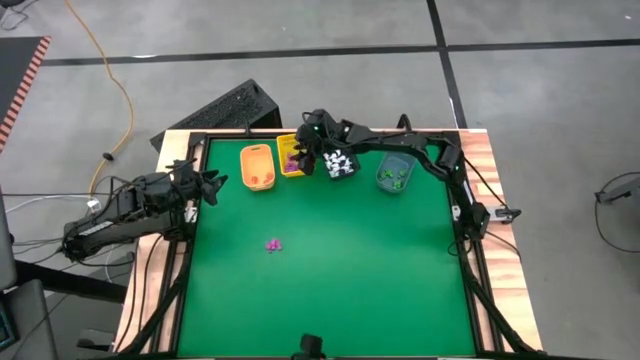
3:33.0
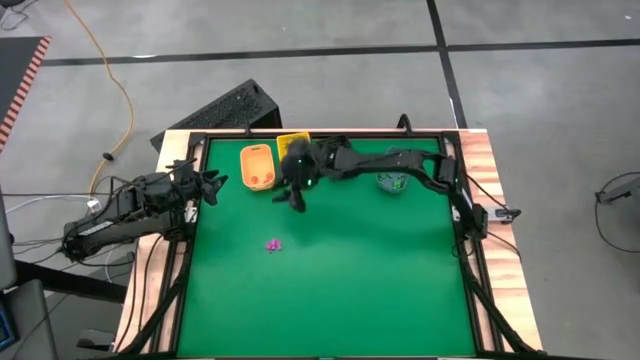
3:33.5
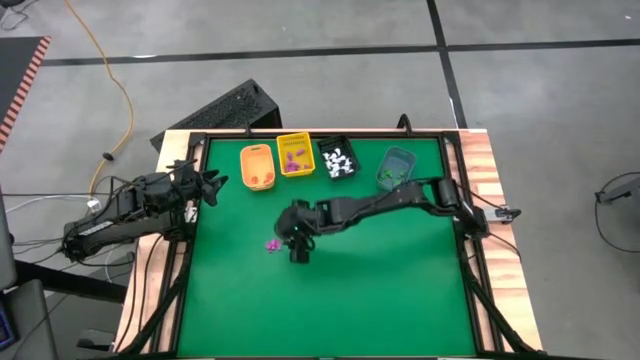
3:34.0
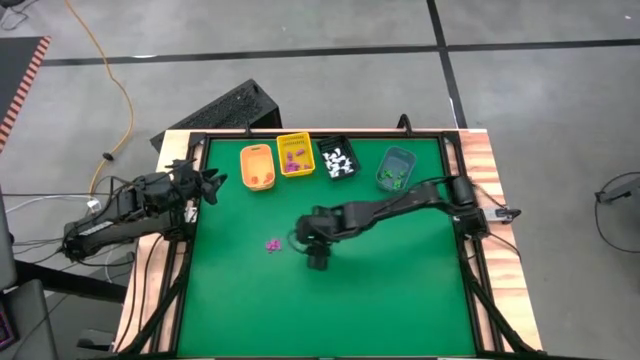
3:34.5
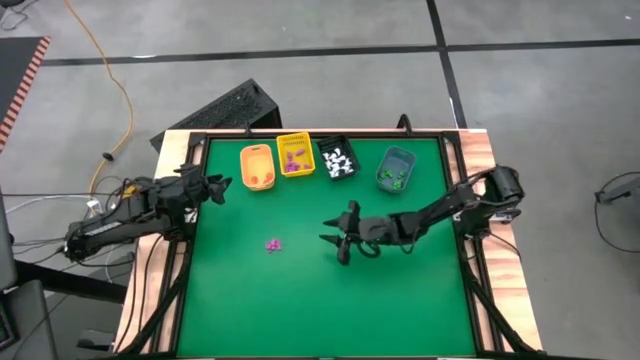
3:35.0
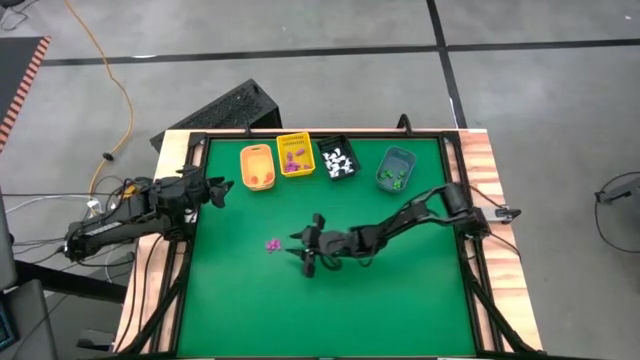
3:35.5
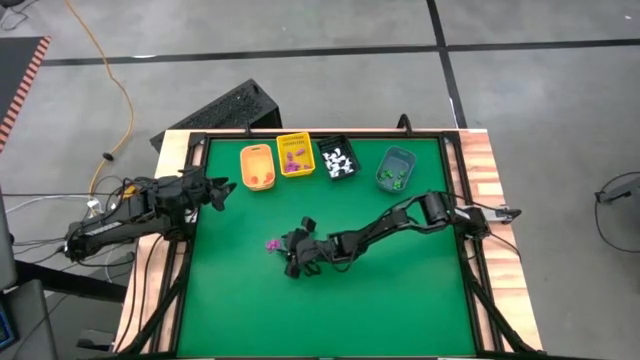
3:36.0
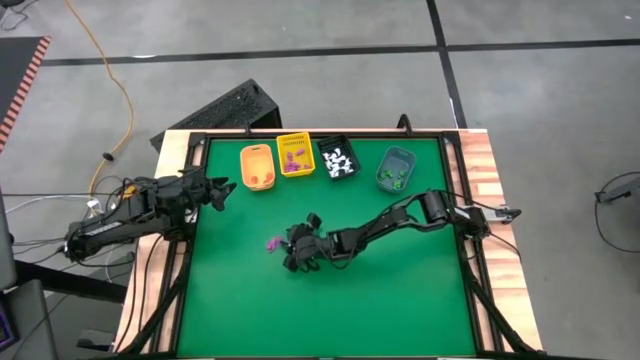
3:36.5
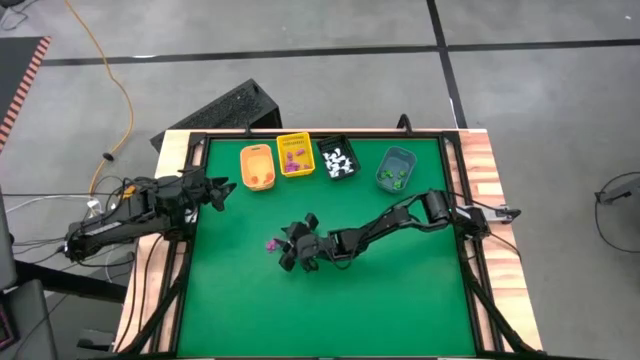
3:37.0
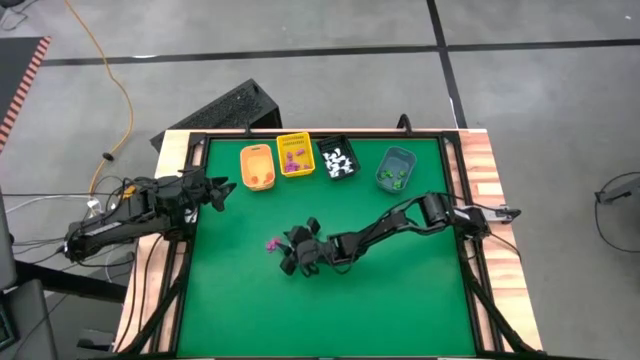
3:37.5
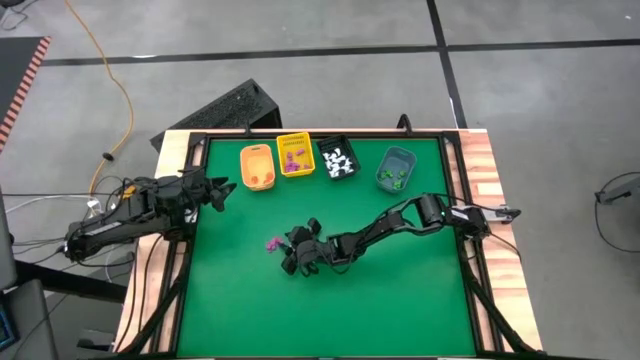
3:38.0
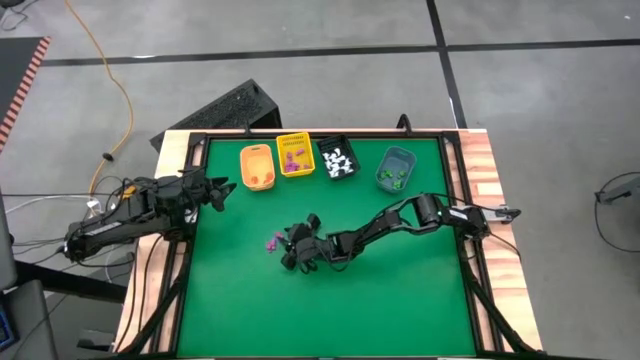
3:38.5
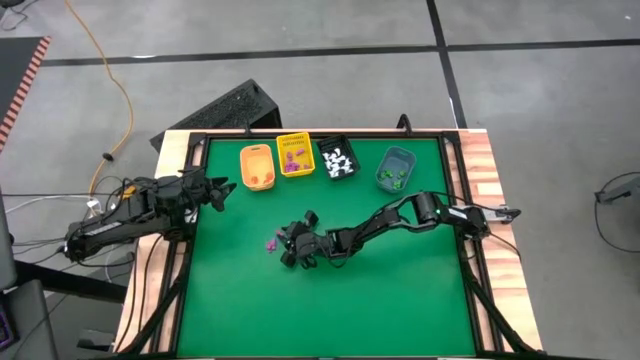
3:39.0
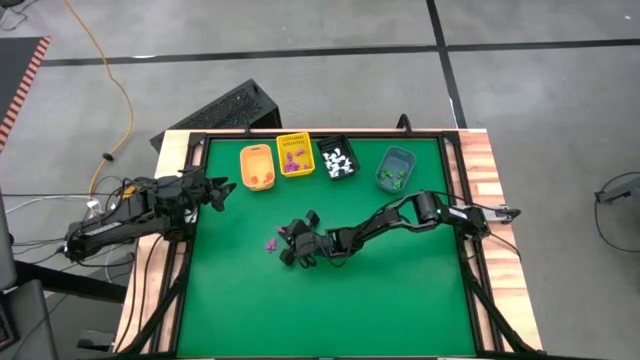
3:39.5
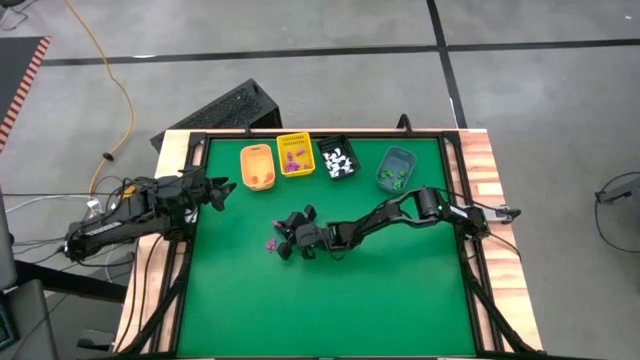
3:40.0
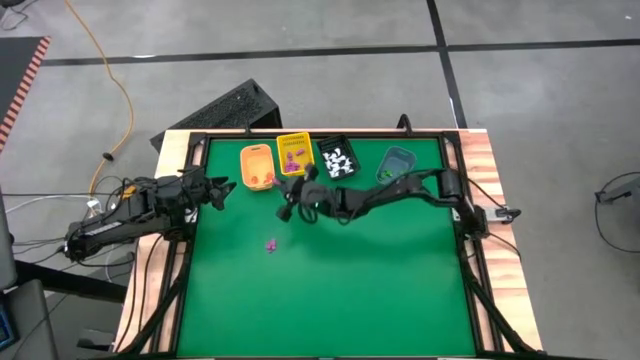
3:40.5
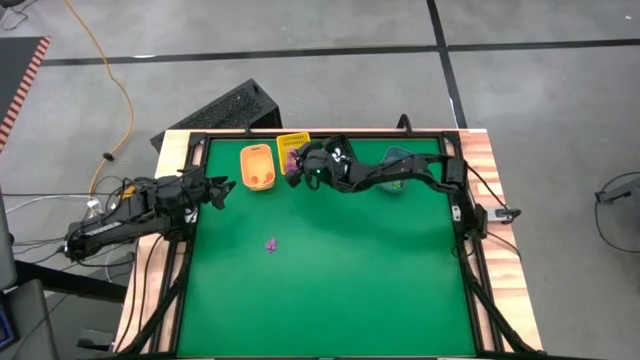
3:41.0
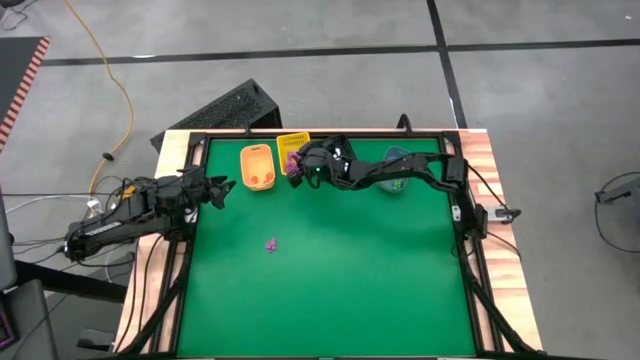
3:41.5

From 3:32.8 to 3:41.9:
Task: Sort Halloween decoration
Put the pink skeleton toy into the yellow bin

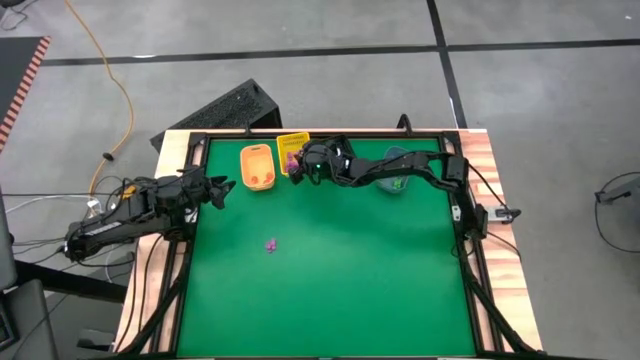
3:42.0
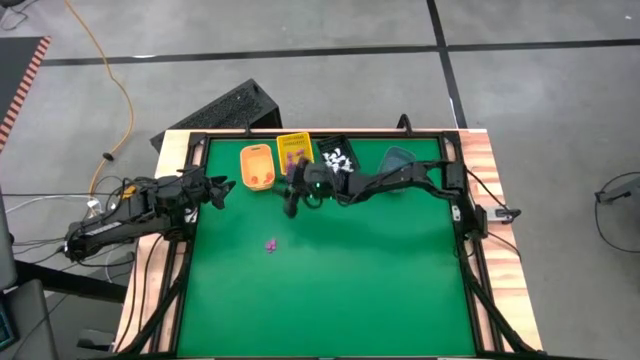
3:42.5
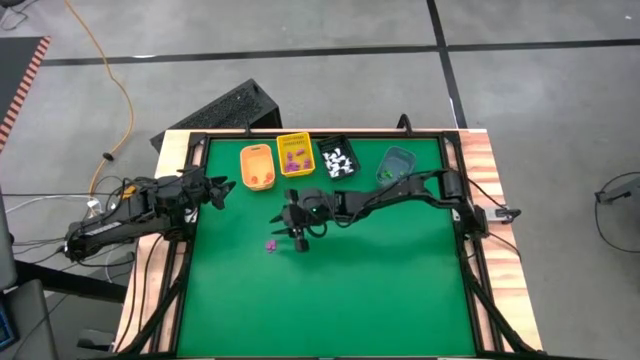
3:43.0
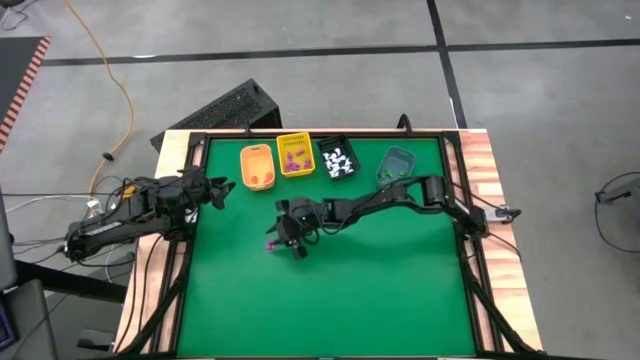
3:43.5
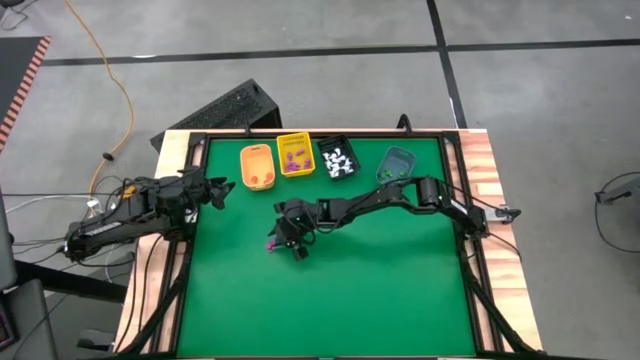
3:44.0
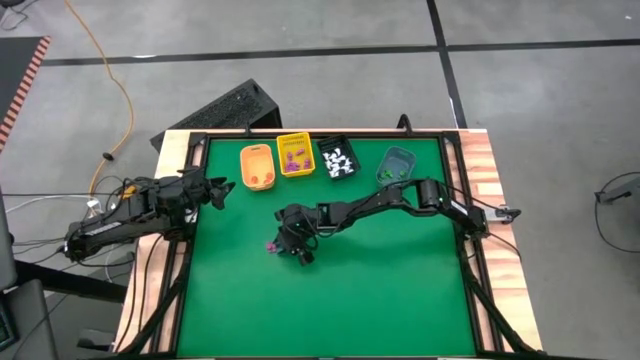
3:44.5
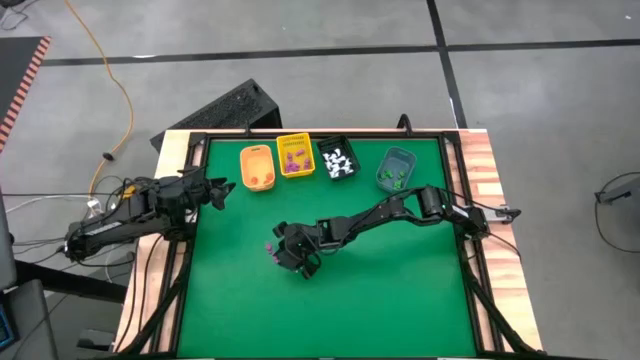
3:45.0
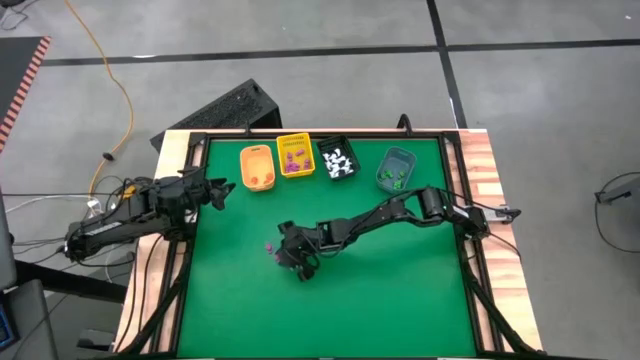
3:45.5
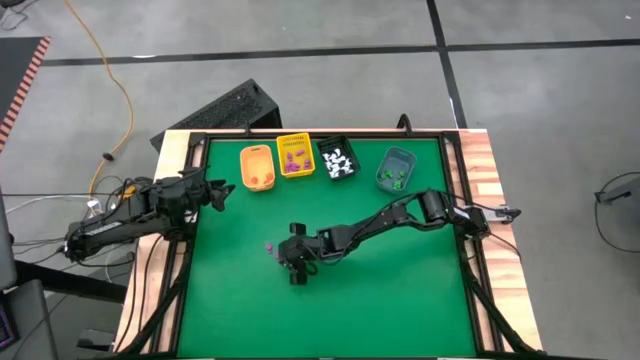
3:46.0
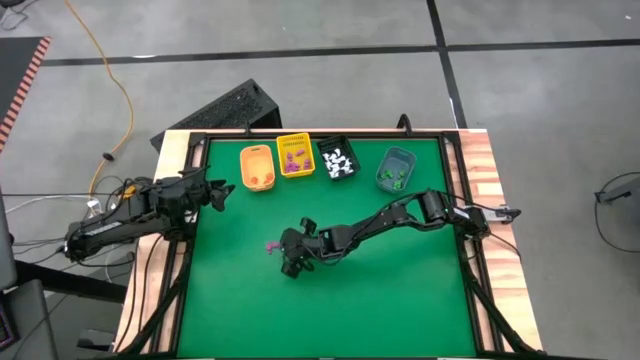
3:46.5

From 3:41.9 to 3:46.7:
Put the pink skeleton toy into the yellow bin

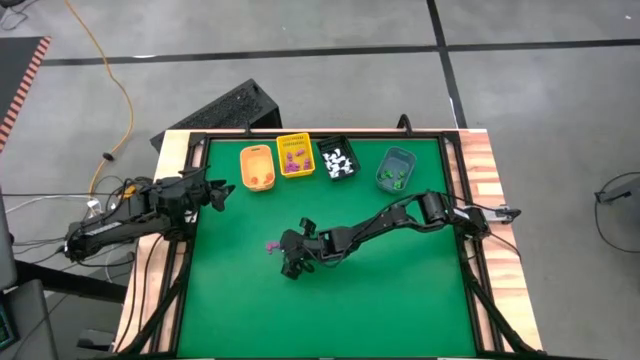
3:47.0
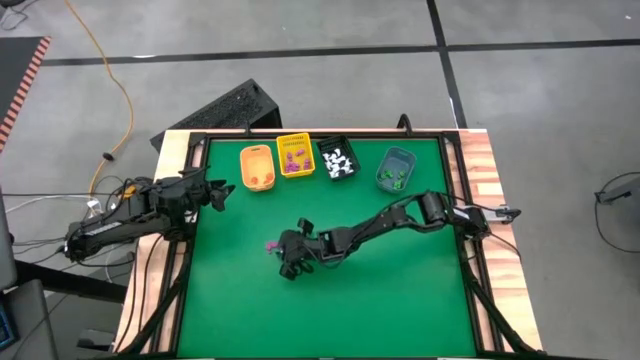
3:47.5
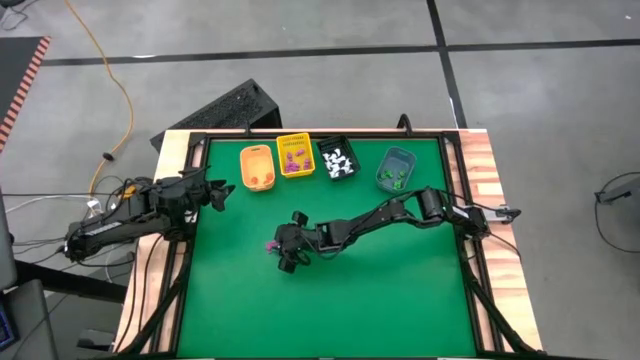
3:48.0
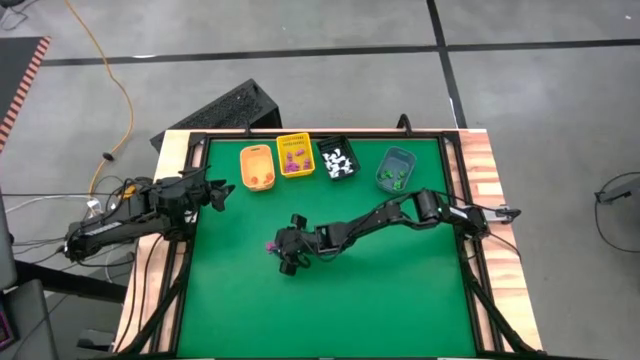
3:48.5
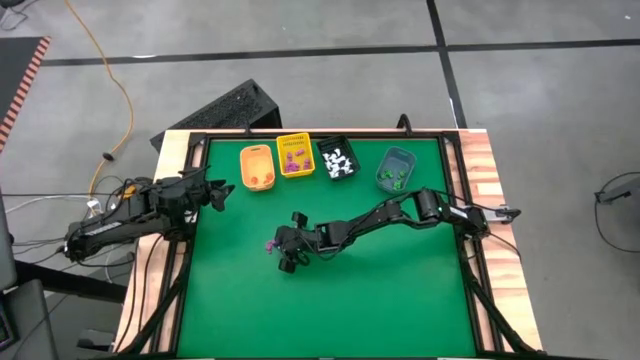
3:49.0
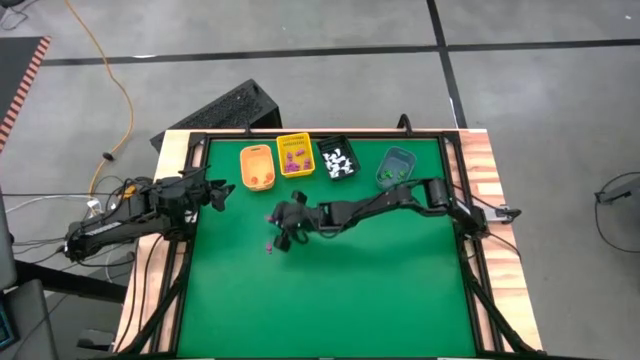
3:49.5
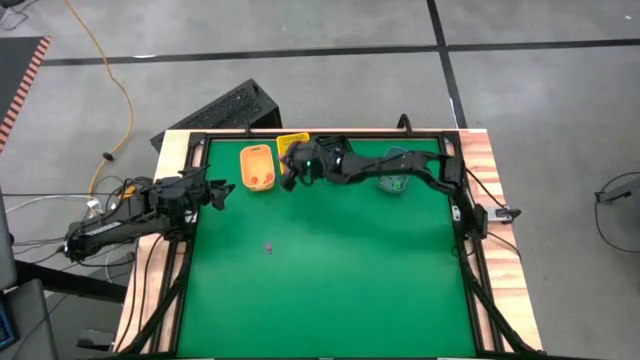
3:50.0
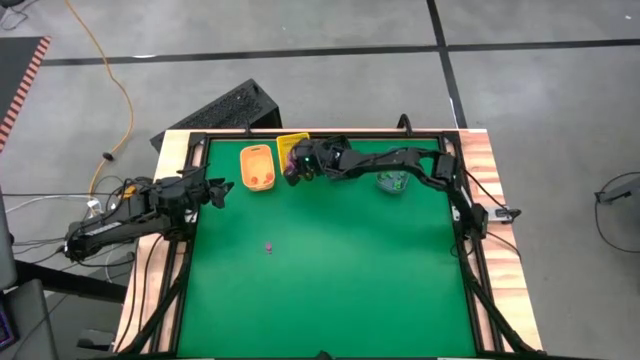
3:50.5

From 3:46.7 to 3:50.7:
Put the pink skeleton toy into the yellow bin

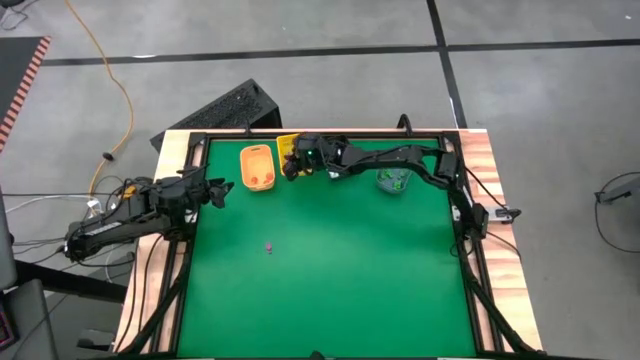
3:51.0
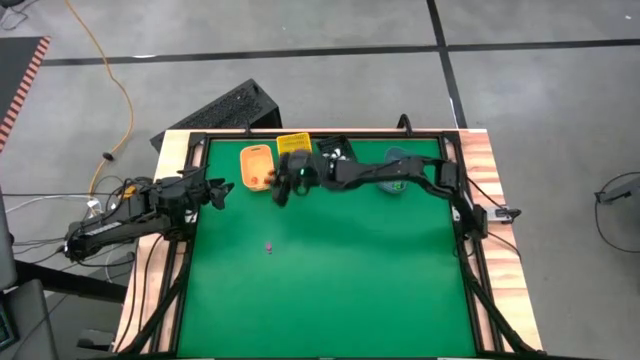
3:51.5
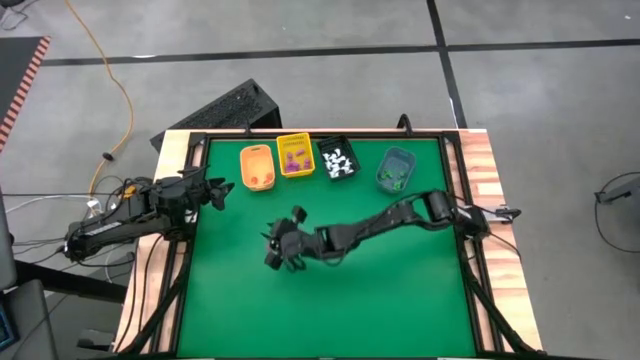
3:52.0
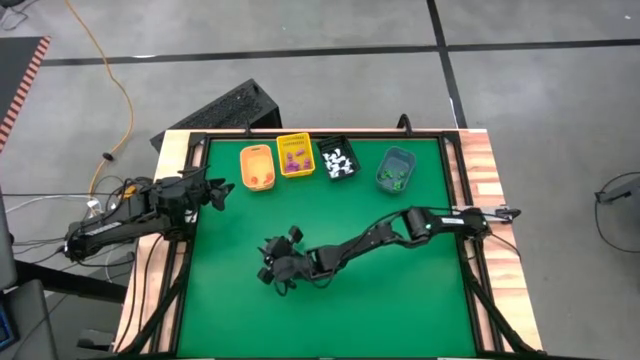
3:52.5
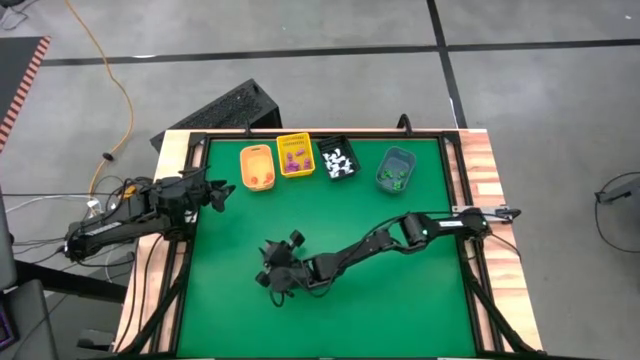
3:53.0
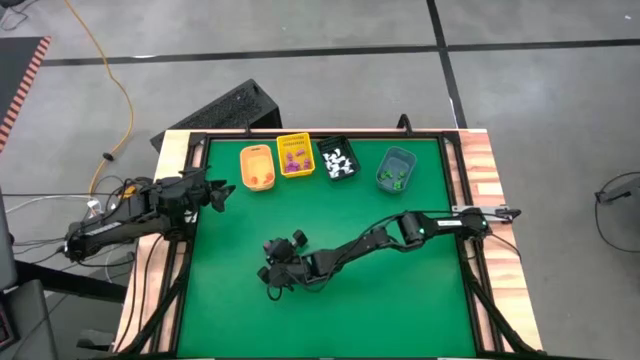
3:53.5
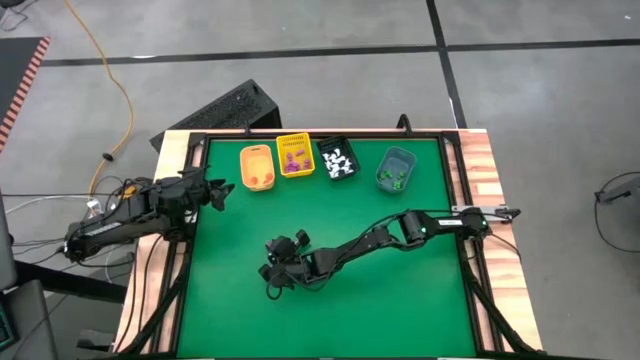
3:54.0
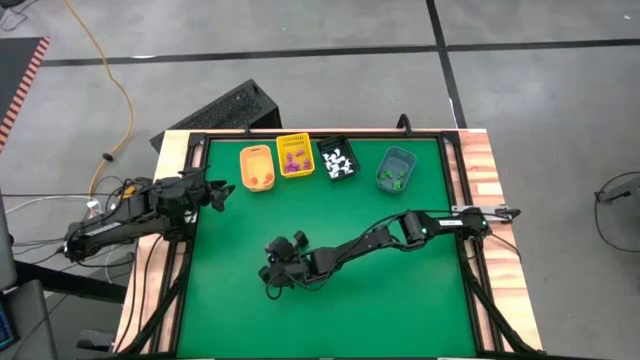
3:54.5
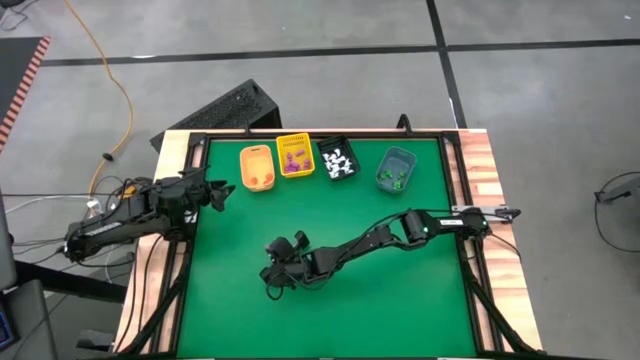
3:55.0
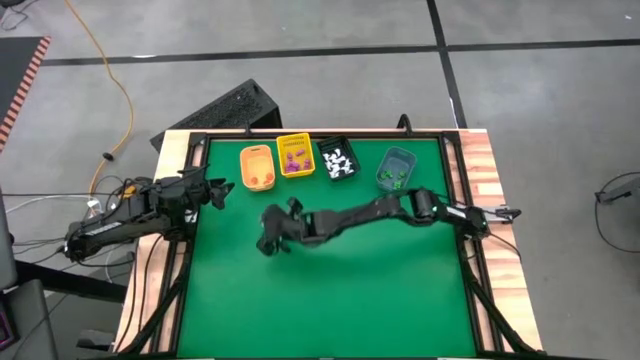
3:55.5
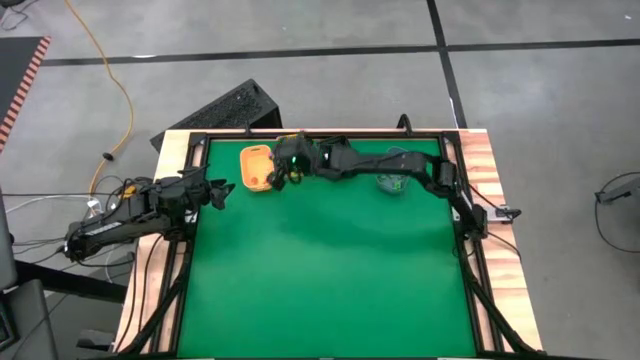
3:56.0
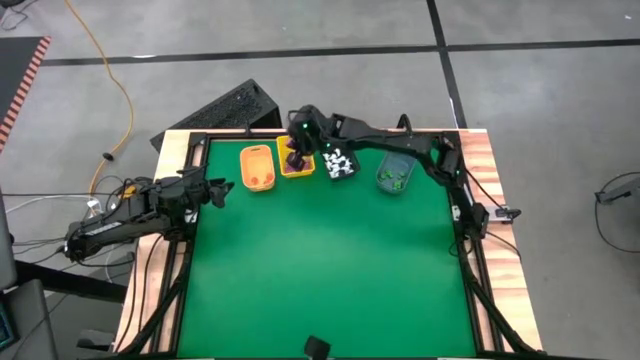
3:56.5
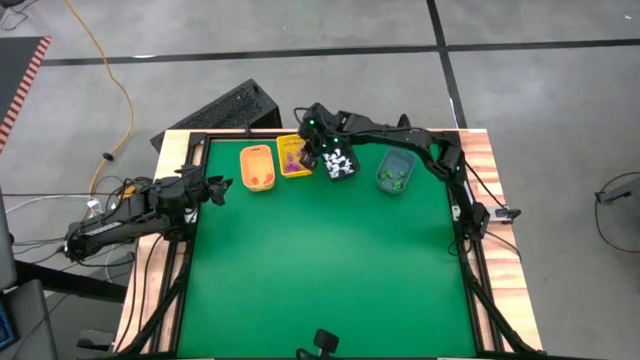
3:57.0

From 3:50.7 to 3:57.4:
Put the pink skeleton toy into the yellow bin
